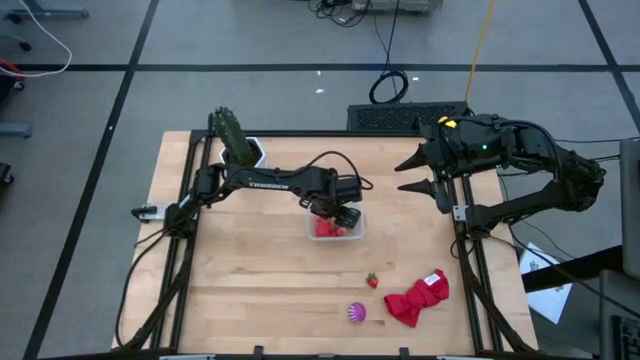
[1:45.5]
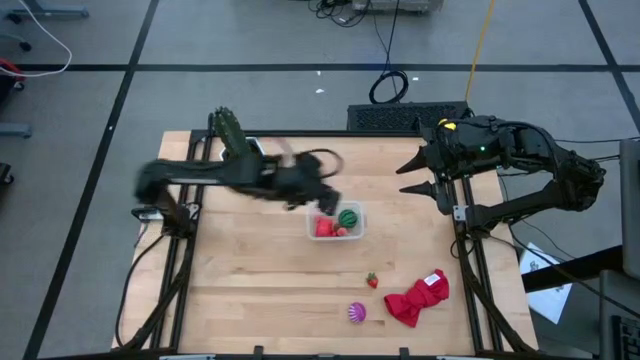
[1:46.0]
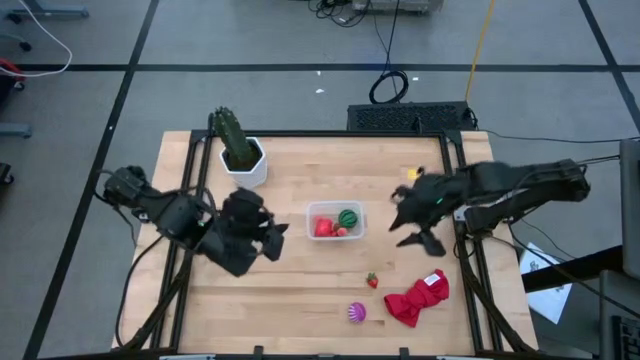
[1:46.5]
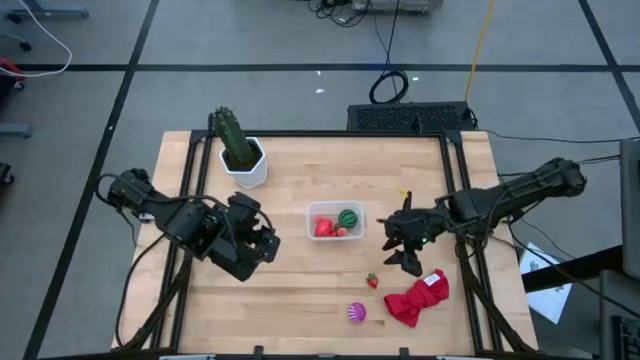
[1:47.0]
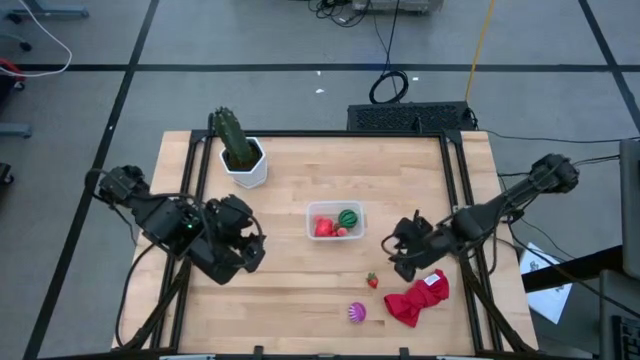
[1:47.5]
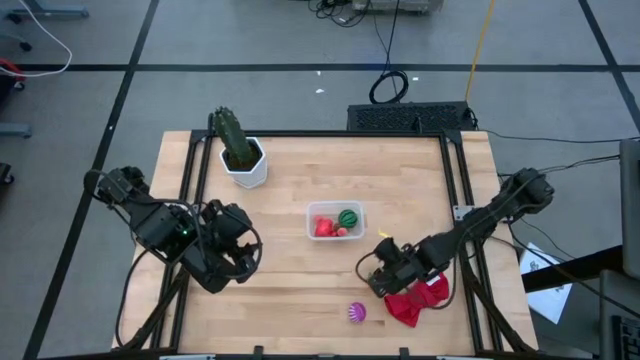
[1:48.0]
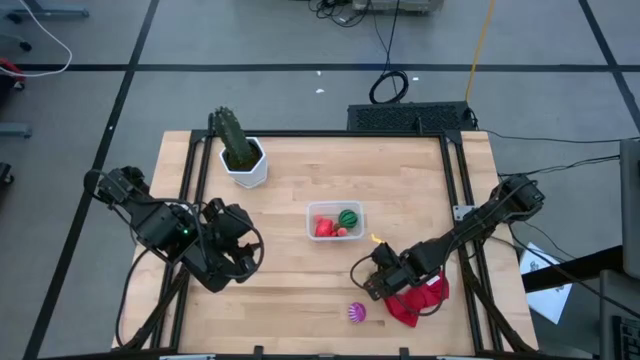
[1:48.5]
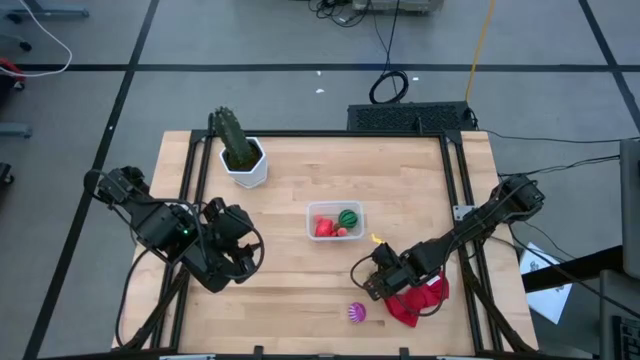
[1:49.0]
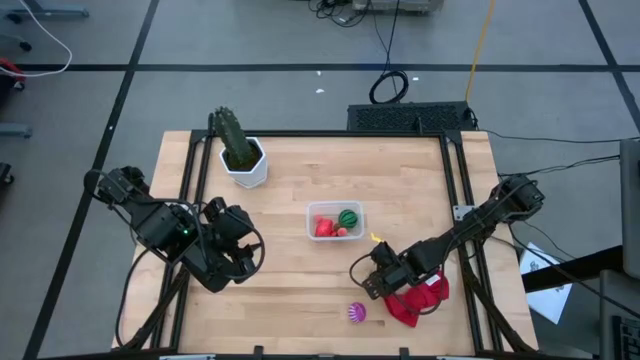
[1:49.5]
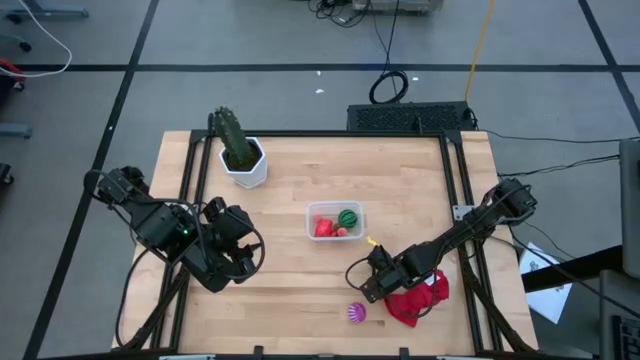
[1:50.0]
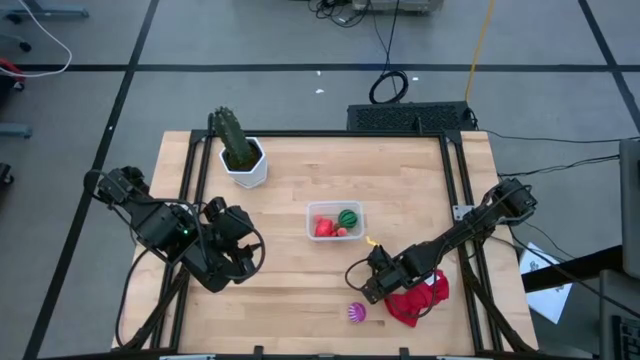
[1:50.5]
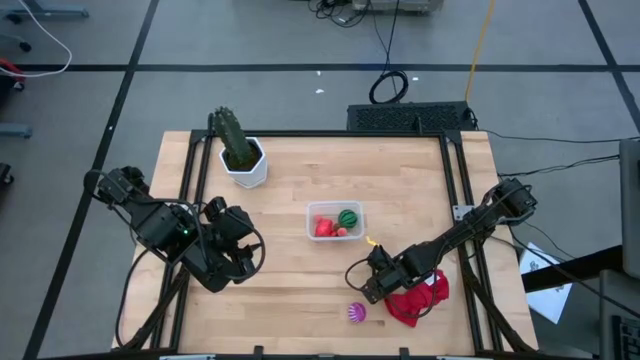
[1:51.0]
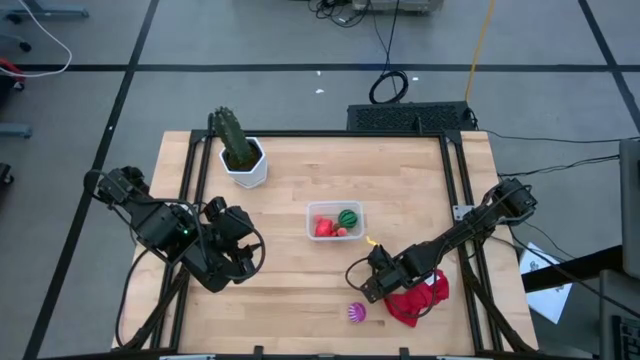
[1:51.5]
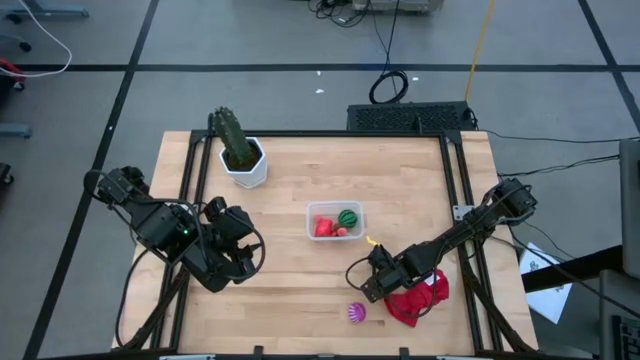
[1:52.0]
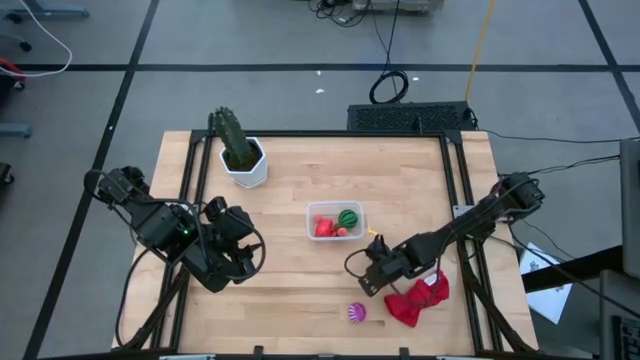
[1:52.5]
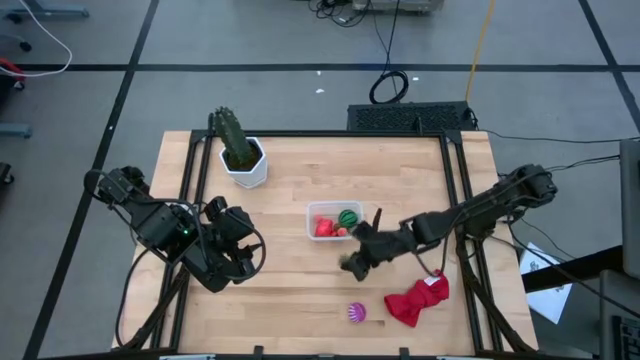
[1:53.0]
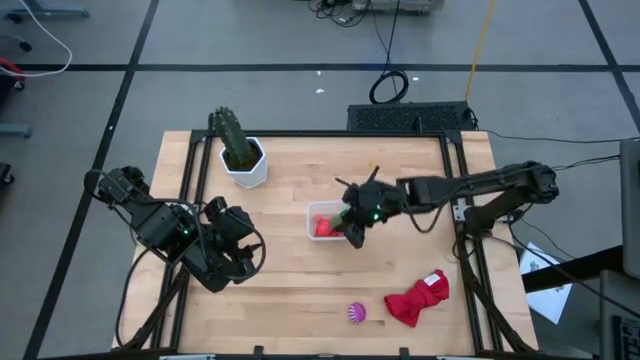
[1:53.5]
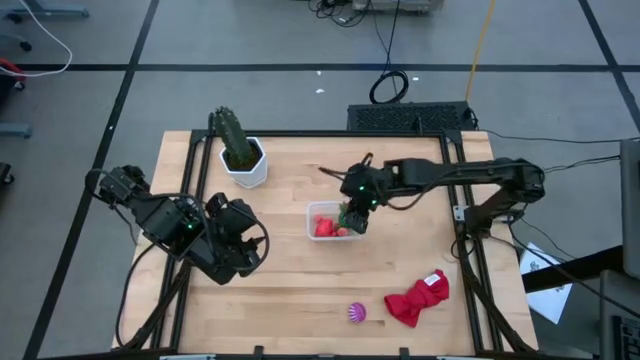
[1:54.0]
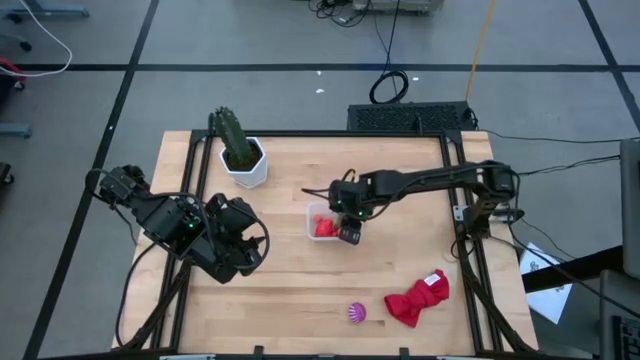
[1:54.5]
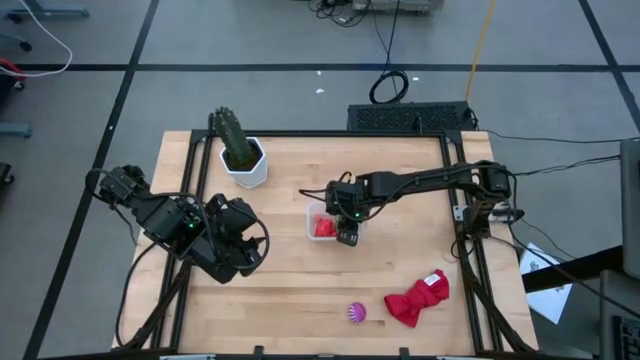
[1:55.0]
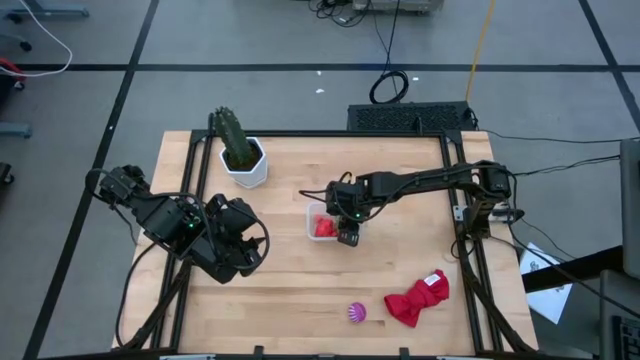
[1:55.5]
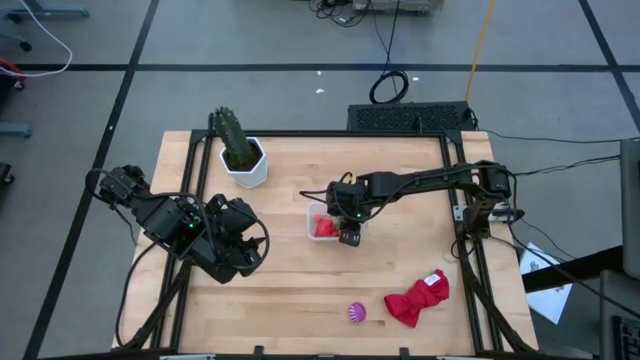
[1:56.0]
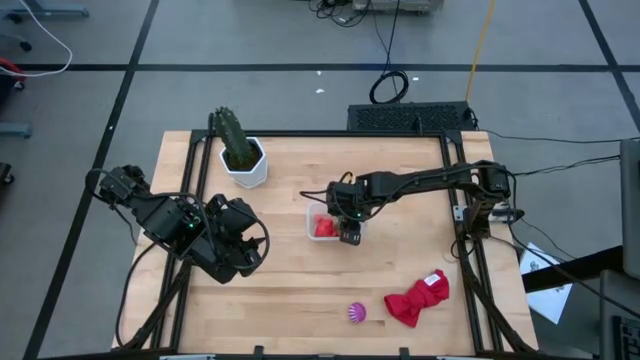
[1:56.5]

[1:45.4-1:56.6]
Task: Pick and placing Produce into tupperware
Put the strawberry into the transparent bin

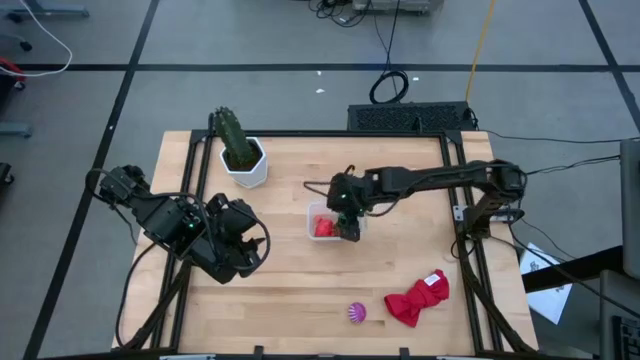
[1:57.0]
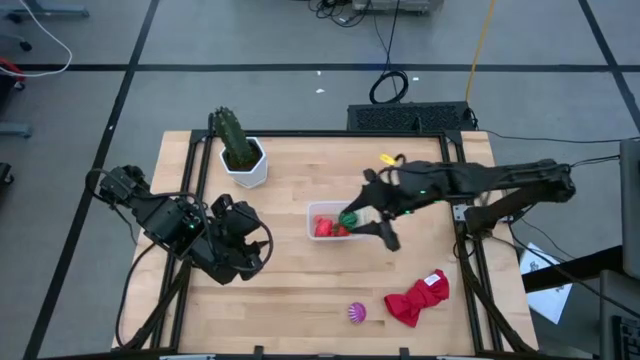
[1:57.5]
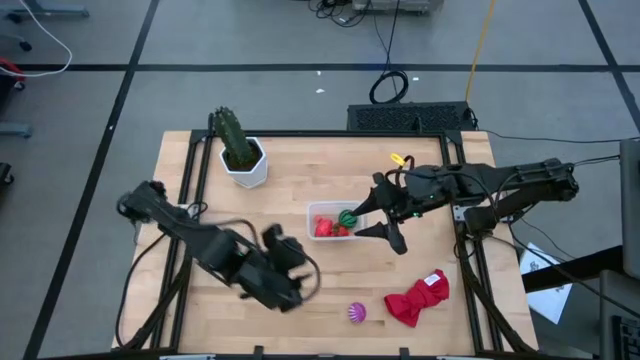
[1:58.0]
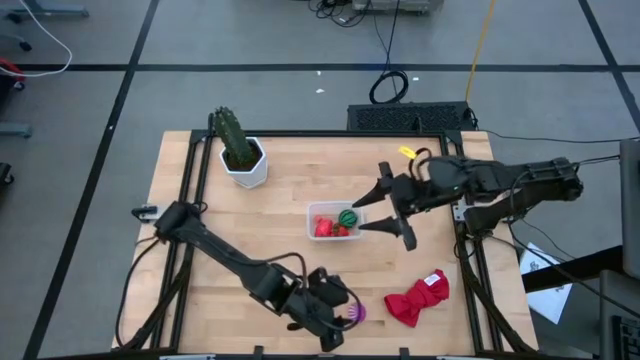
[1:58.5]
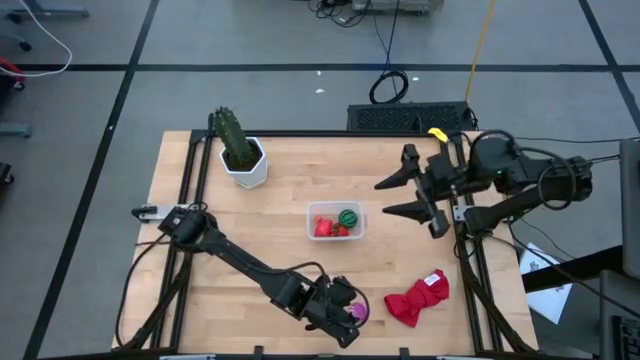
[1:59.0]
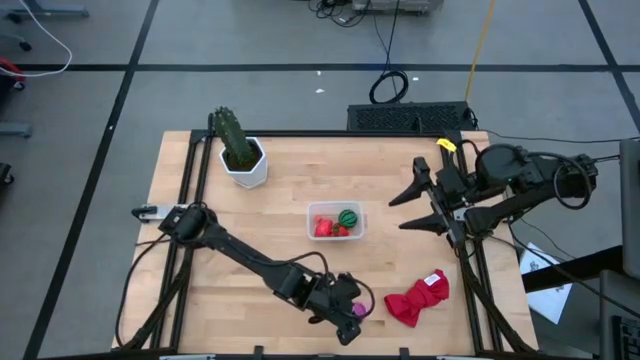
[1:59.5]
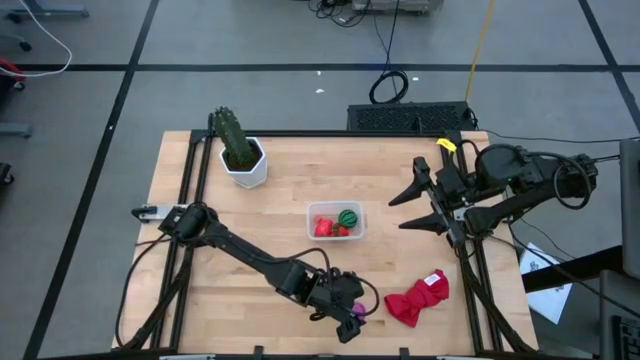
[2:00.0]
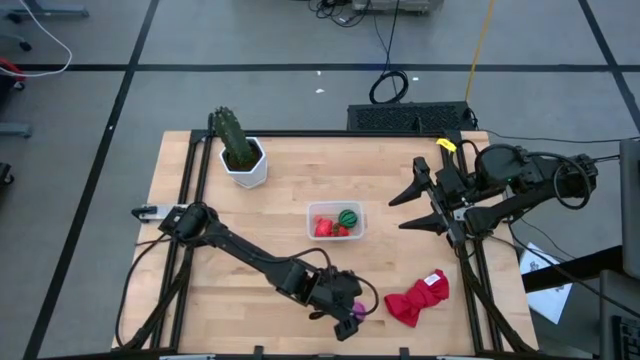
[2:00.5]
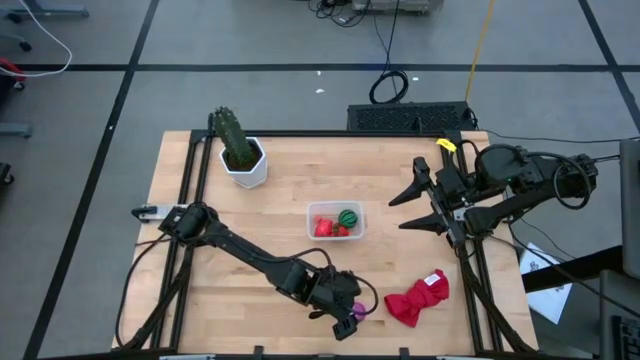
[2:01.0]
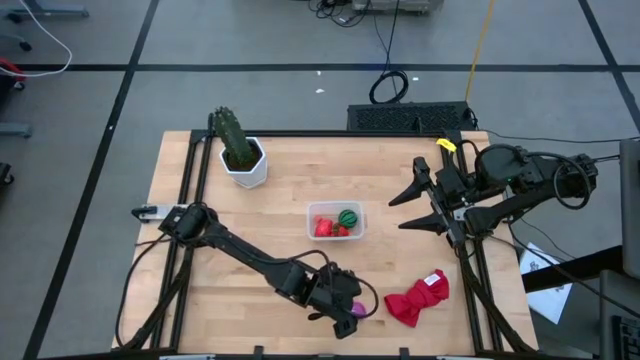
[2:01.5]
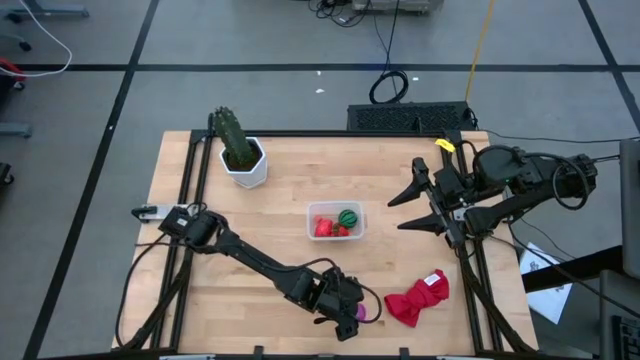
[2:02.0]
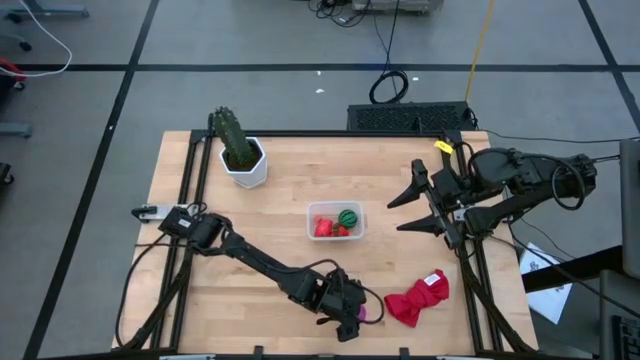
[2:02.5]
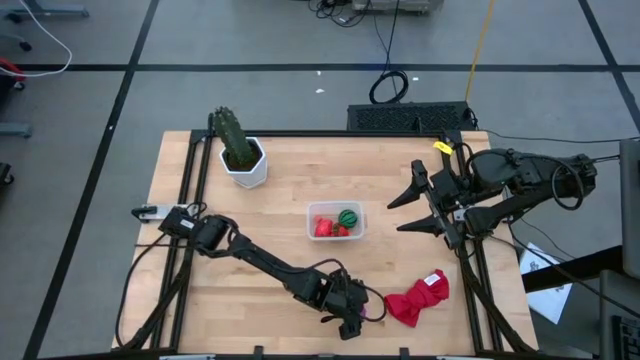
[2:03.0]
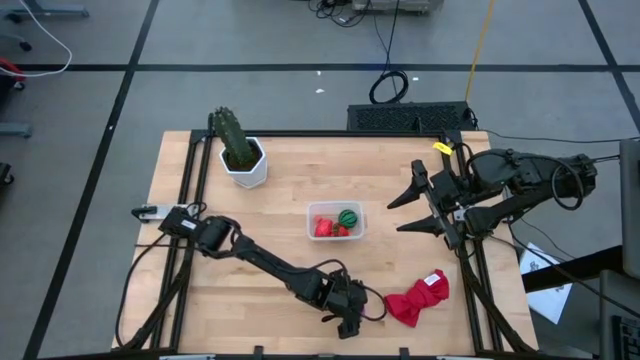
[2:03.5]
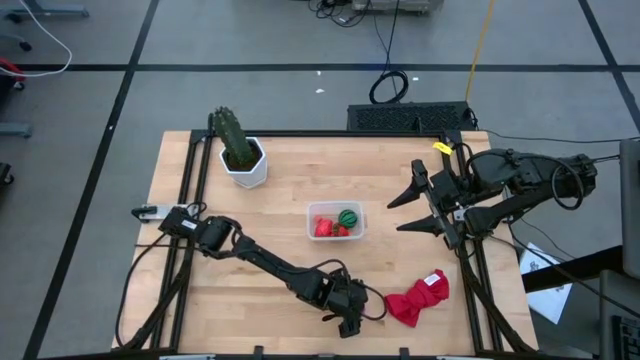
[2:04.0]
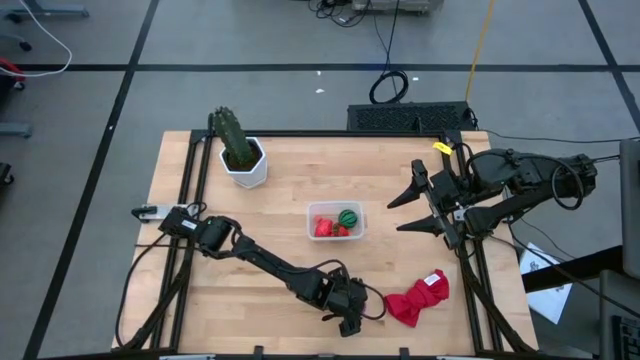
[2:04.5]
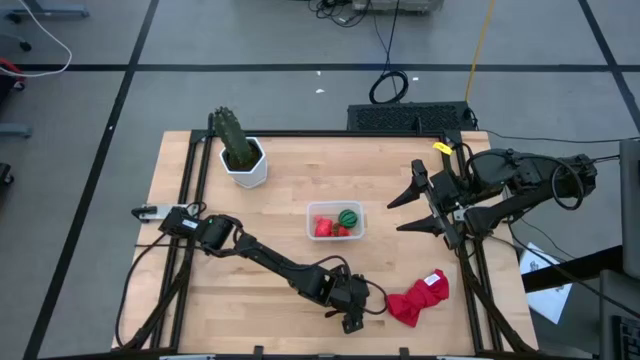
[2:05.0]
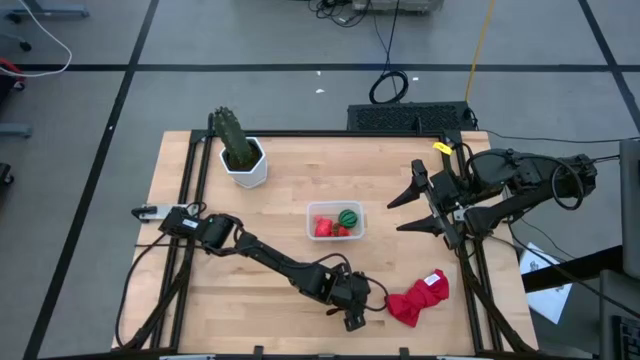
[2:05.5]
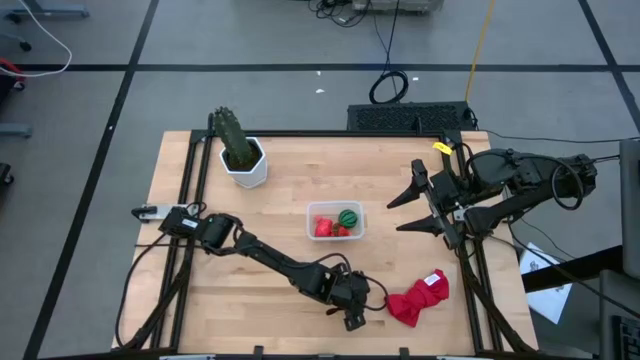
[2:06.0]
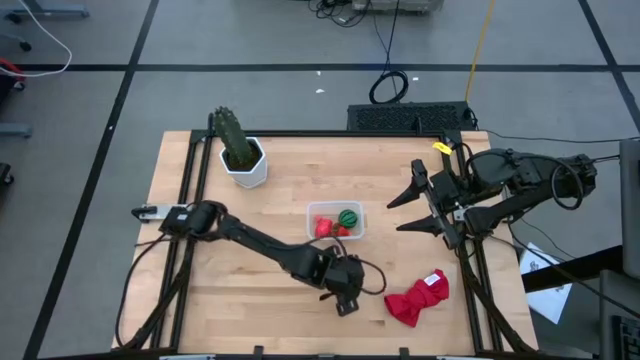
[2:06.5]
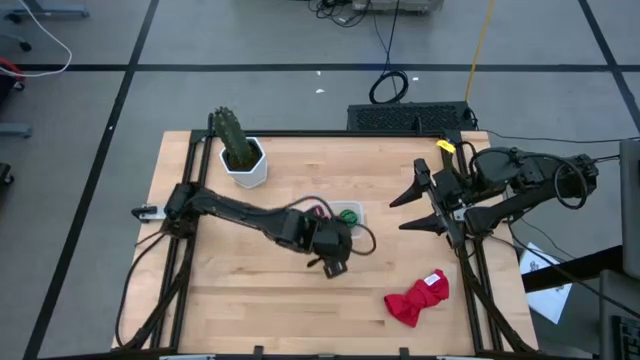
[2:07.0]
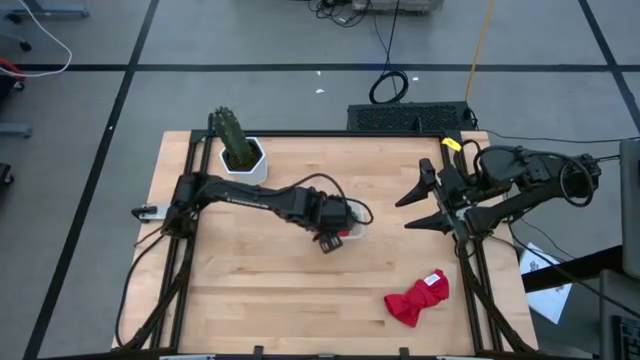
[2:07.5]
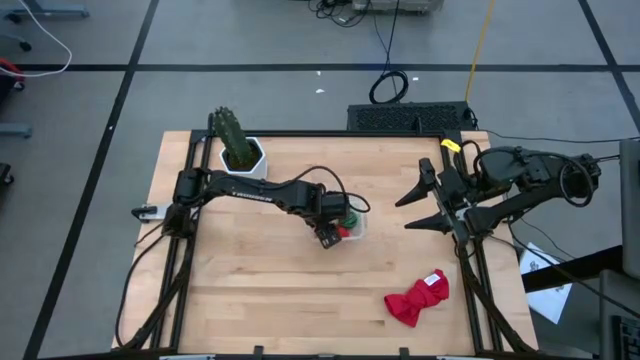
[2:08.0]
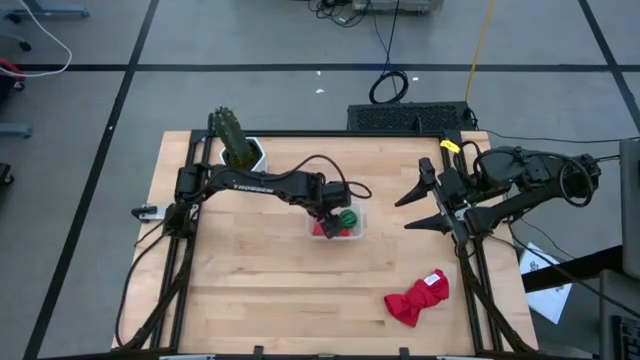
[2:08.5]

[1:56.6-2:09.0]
Put the onion into the transparent bin
